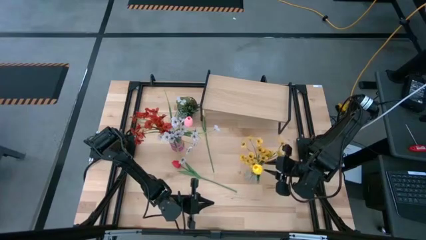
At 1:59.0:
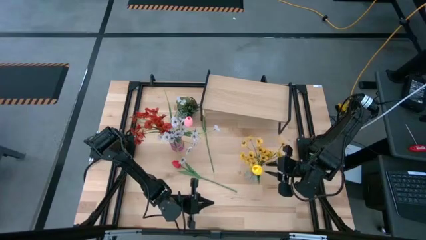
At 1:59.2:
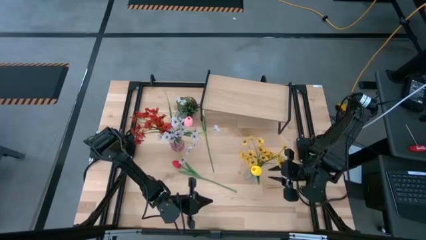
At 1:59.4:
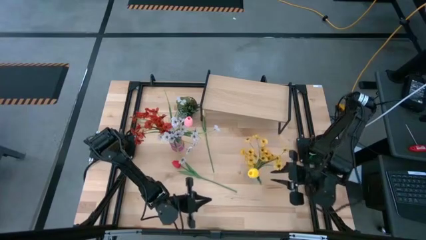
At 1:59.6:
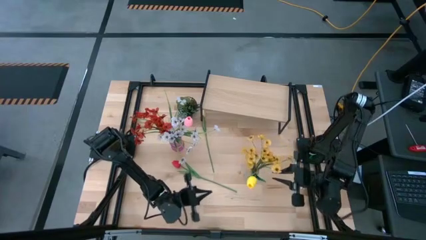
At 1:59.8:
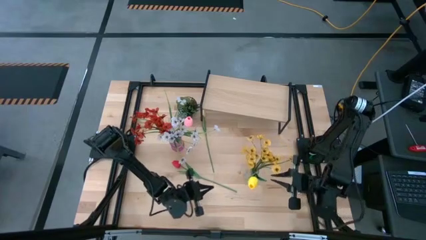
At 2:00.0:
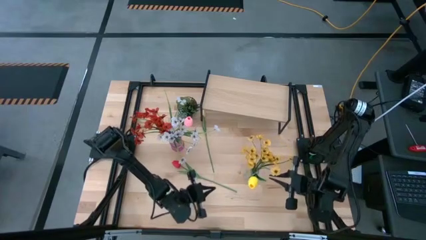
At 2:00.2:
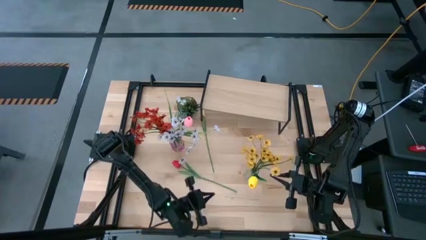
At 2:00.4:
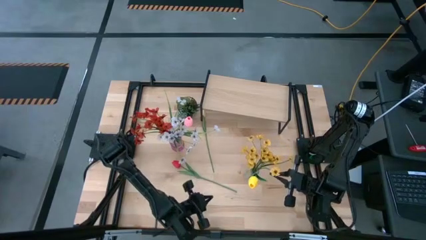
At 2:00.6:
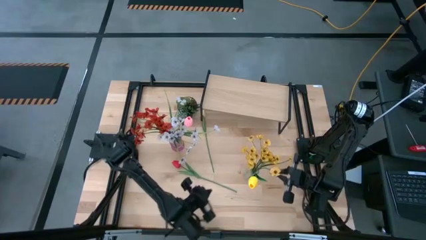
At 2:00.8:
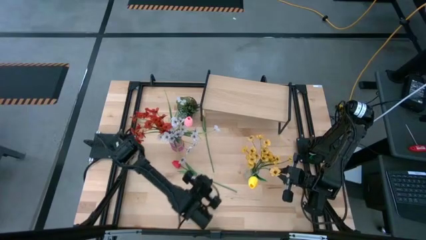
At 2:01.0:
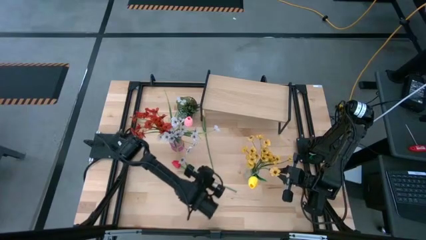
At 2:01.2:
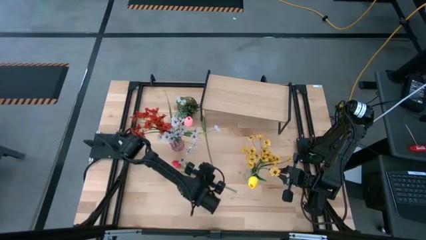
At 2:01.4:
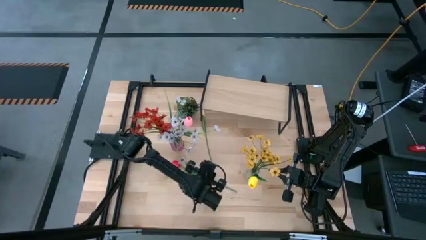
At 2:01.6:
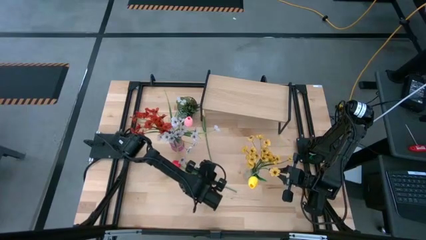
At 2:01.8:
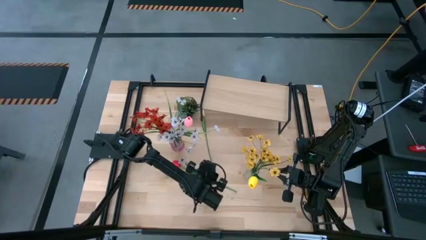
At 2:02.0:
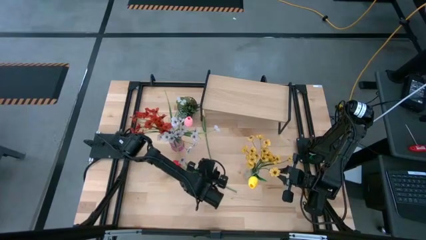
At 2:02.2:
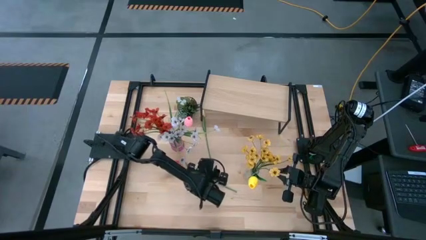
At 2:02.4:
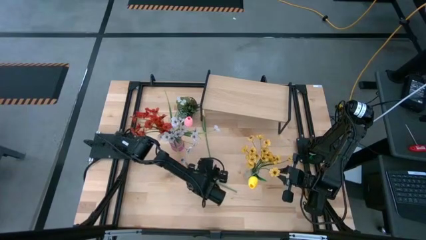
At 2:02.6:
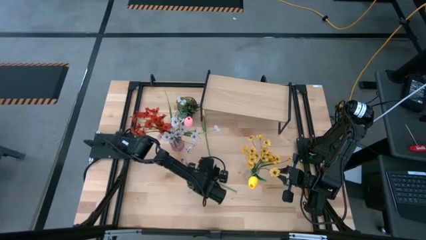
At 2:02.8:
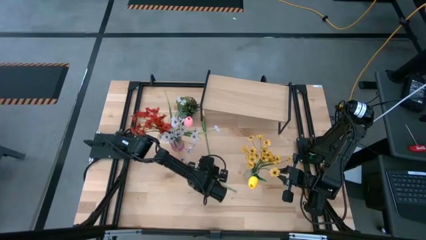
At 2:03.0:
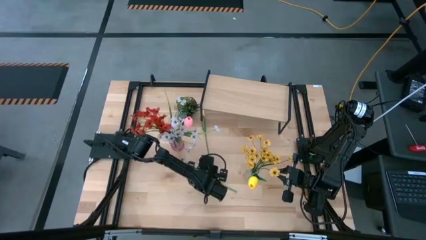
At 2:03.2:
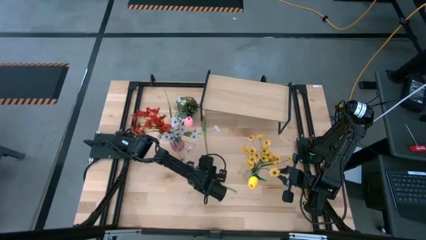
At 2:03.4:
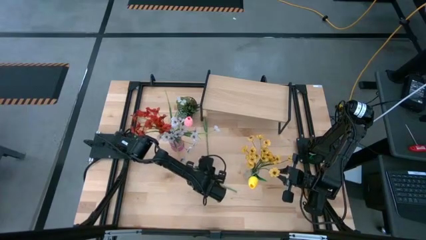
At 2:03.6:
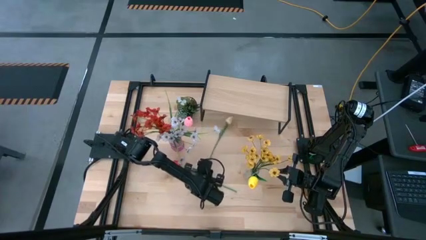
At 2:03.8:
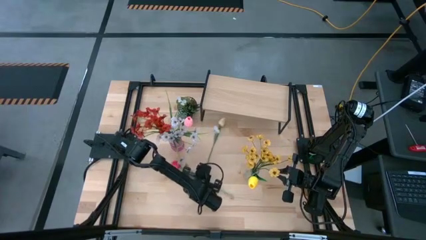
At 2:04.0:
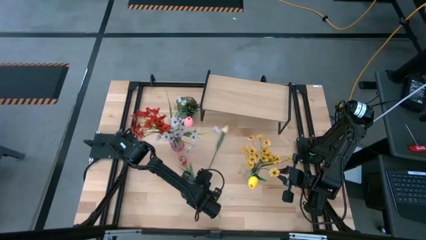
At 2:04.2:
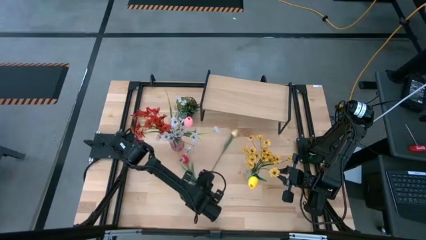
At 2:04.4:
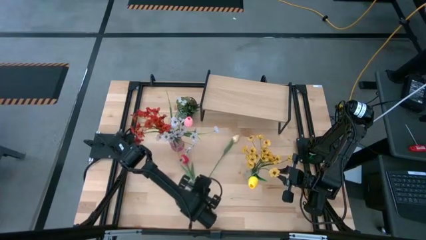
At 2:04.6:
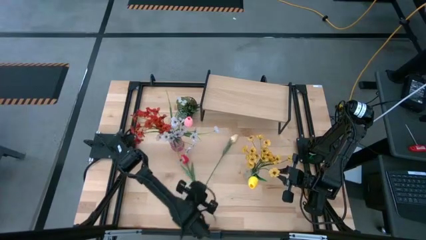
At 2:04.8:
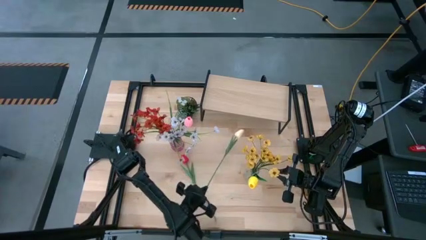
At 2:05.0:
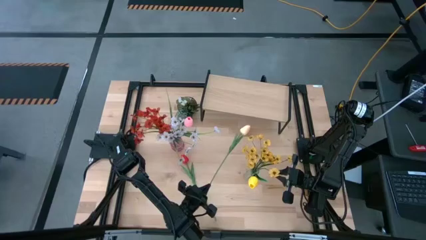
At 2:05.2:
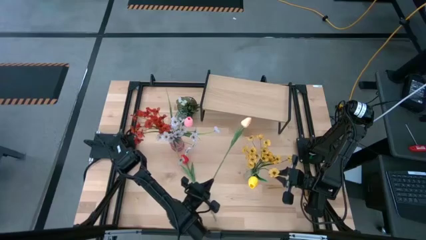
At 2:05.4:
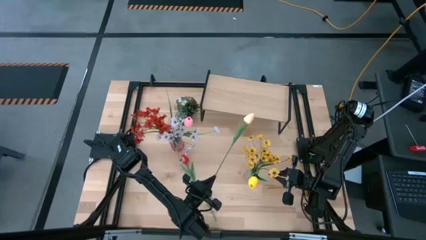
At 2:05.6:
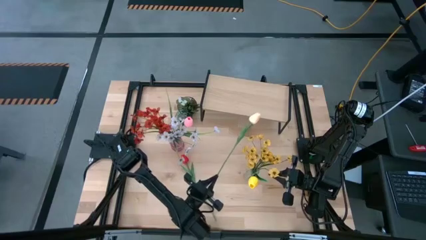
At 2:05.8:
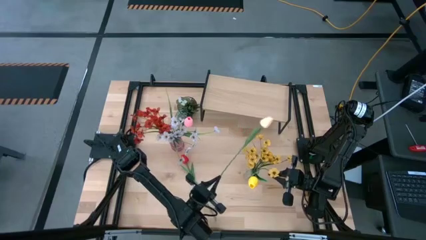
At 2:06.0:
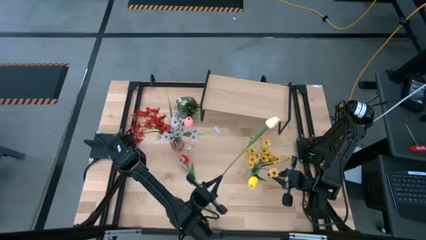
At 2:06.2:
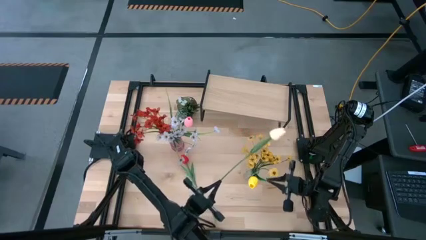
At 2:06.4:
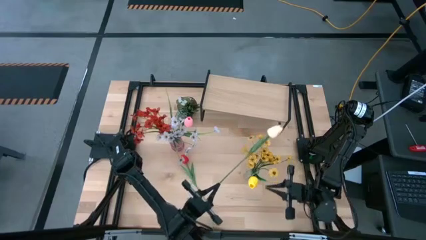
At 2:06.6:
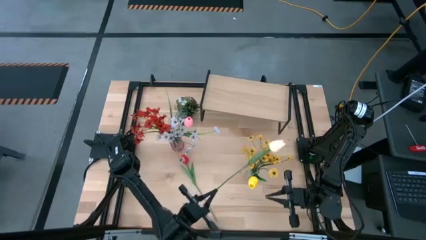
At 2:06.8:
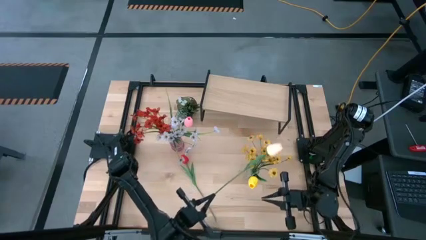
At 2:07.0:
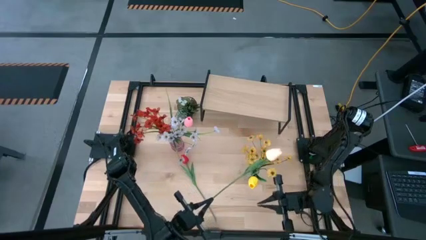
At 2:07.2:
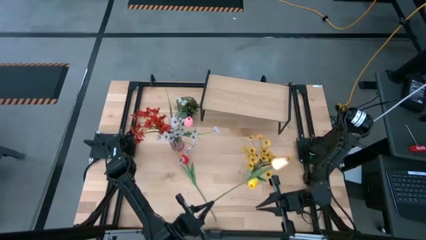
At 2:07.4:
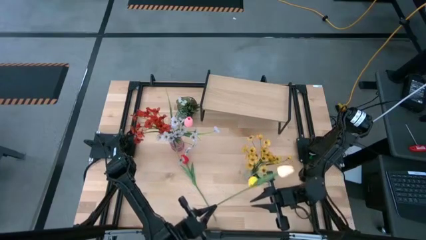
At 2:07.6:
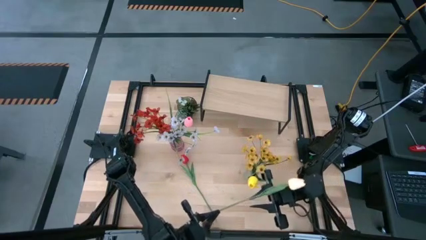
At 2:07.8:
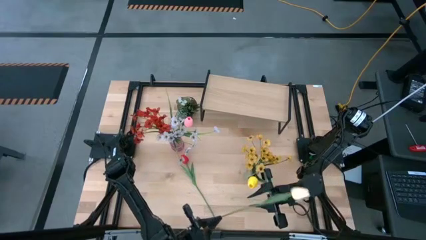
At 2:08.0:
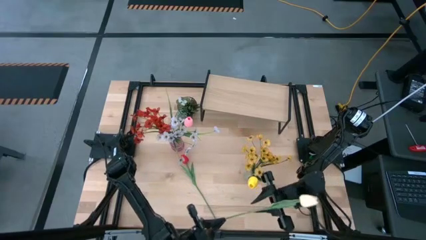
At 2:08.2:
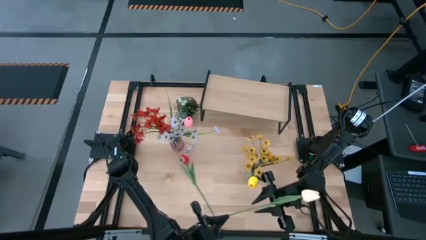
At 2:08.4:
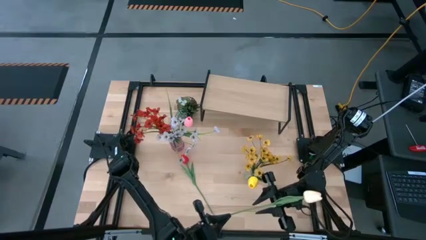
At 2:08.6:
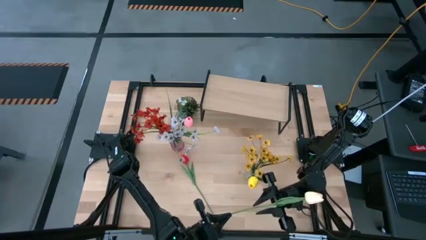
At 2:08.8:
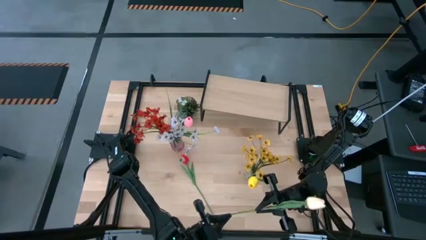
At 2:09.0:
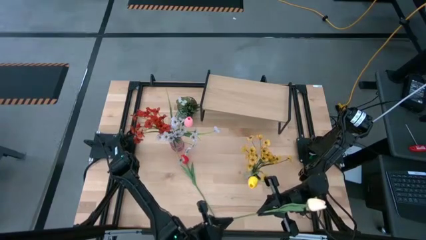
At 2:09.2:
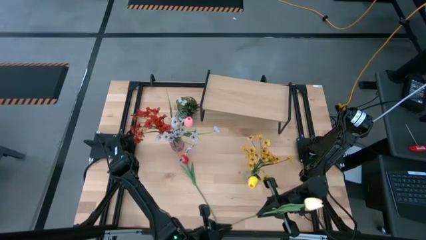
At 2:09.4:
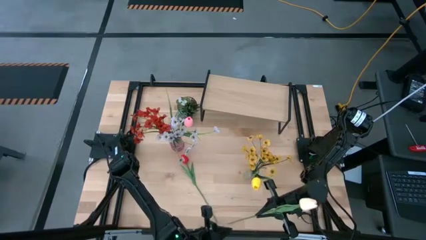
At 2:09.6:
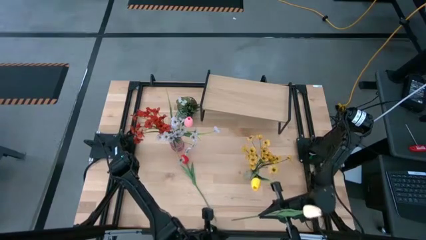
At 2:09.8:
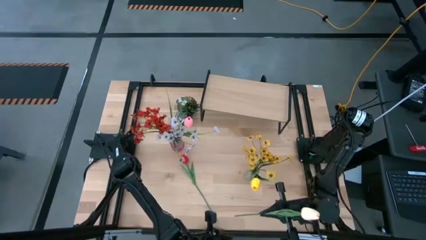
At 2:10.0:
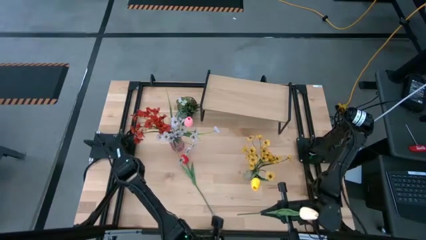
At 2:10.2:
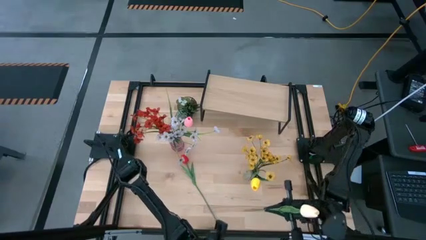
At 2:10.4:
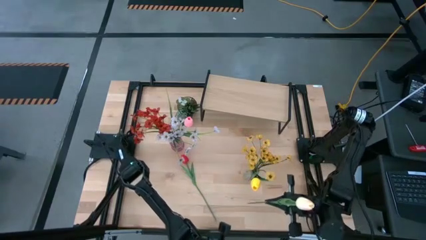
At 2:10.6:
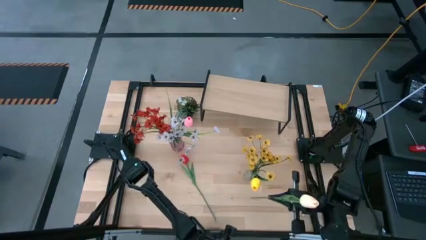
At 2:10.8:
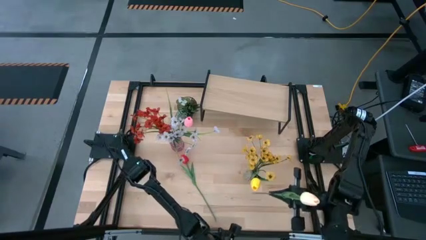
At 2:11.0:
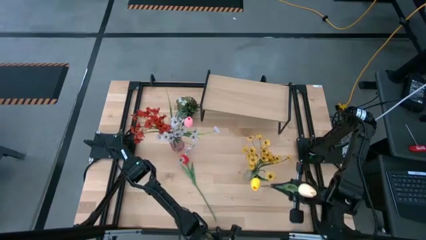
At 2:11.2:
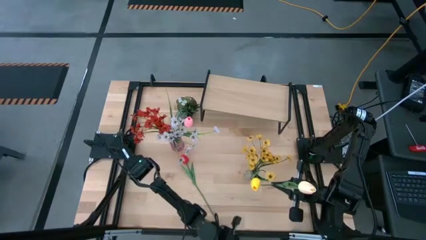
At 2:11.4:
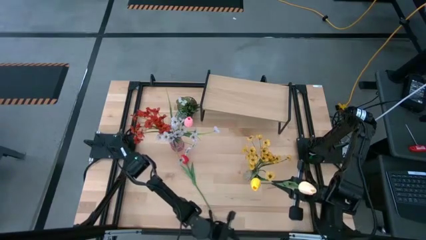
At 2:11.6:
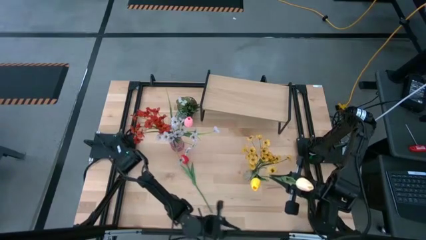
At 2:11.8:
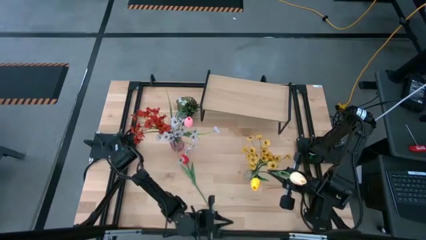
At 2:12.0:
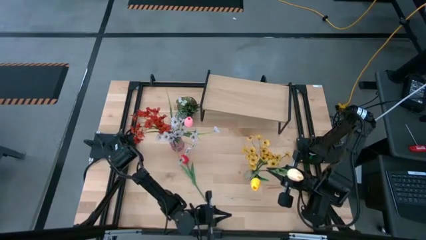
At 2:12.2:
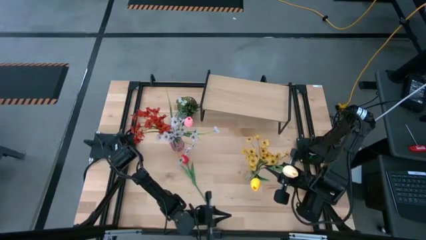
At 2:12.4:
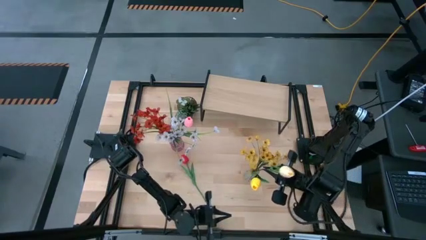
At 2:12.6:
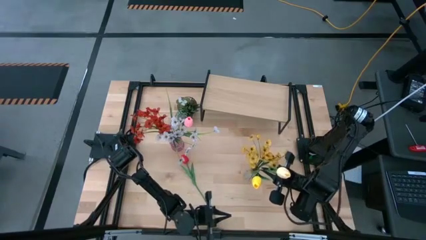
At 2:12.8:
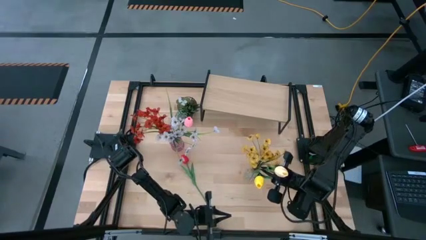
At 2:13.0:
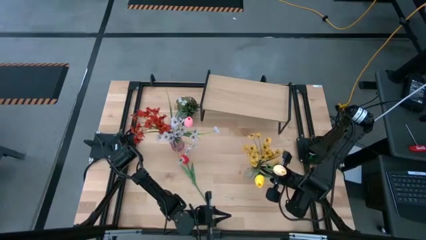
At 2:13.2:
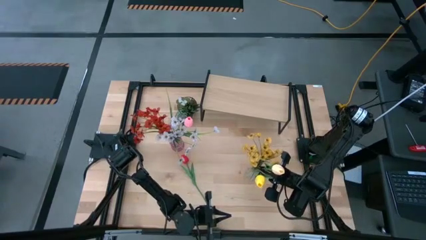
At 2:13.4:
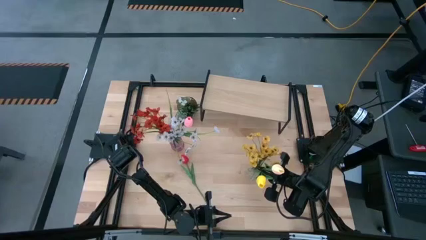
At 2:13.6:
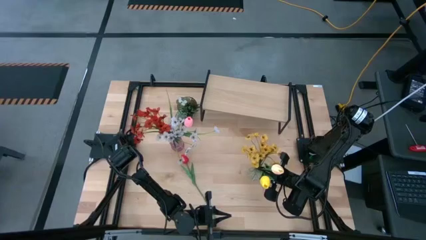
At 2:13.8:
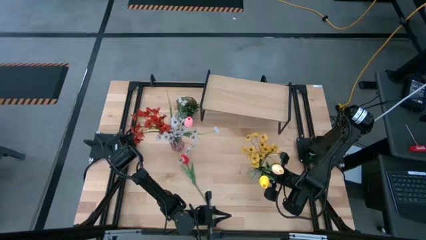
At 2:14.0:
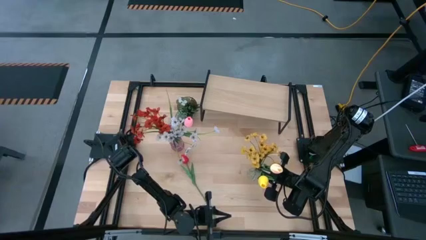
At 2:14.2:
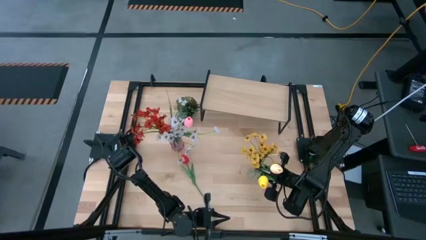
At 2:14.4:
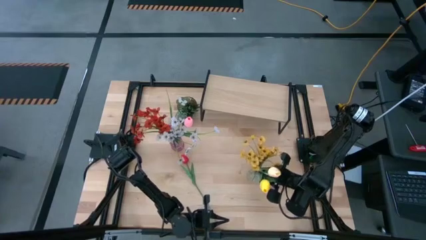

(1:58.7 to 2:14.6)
Task: Pick and place flowers into a vace then onto a shelf
Put the white flower into the transparent vase
